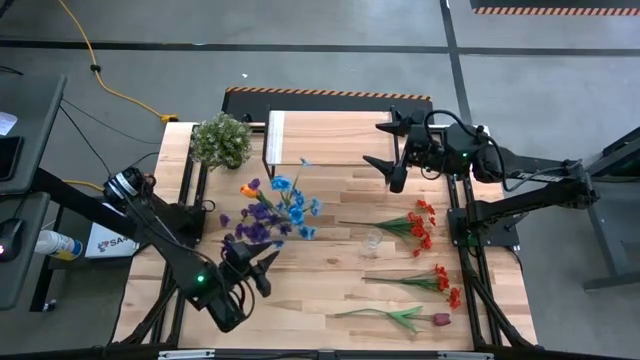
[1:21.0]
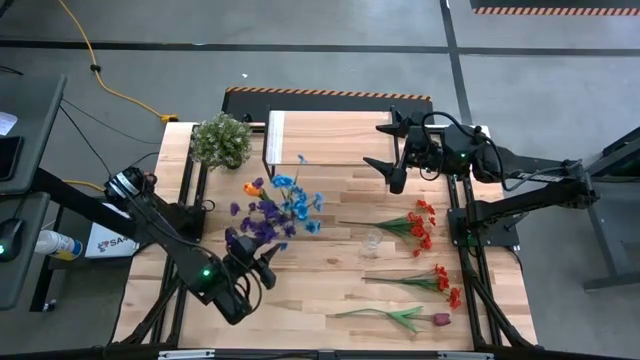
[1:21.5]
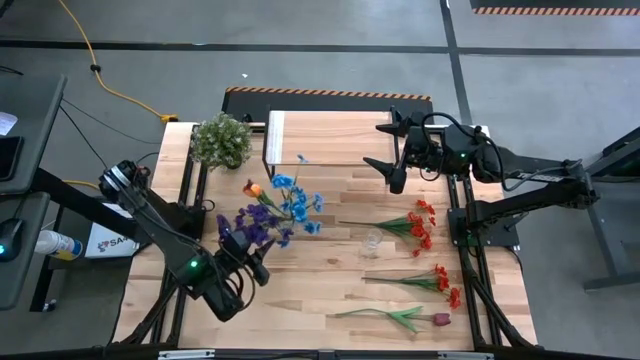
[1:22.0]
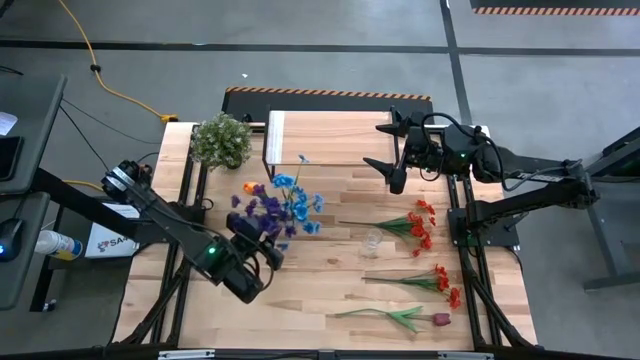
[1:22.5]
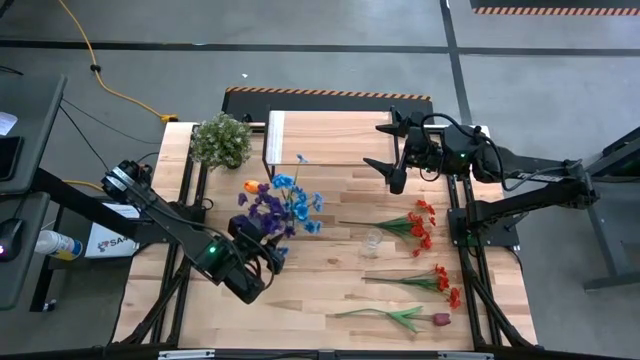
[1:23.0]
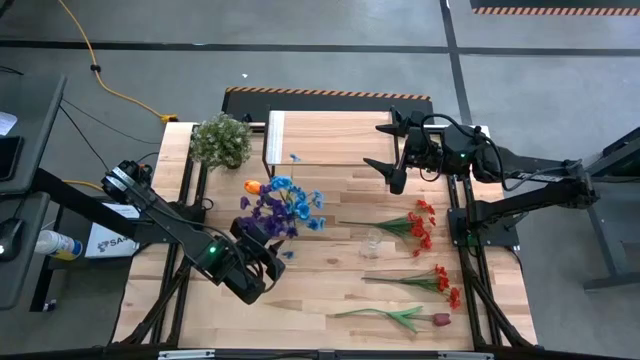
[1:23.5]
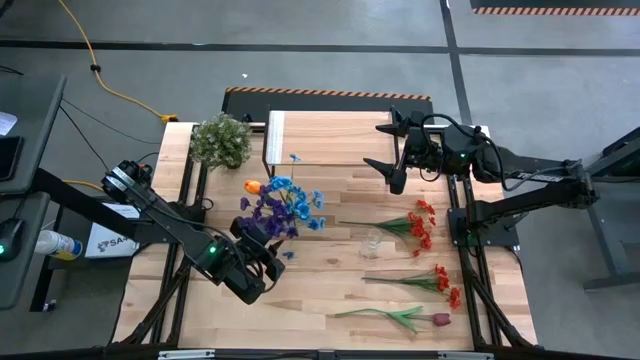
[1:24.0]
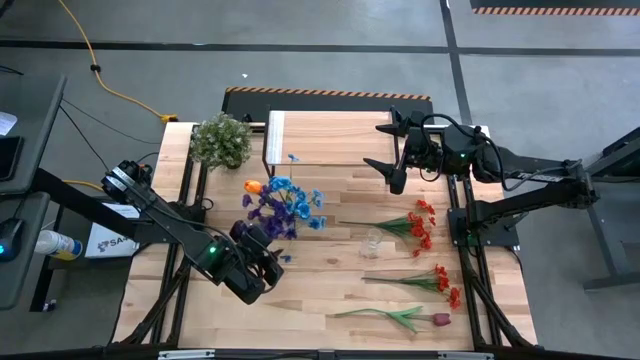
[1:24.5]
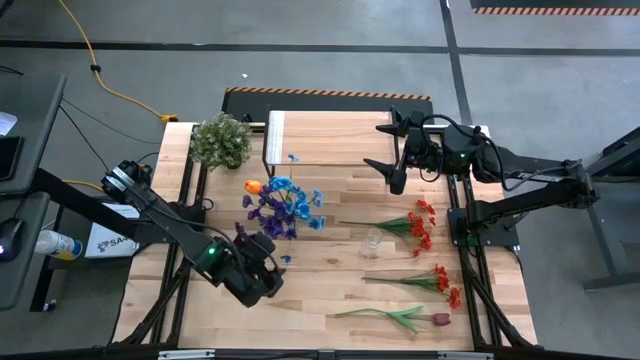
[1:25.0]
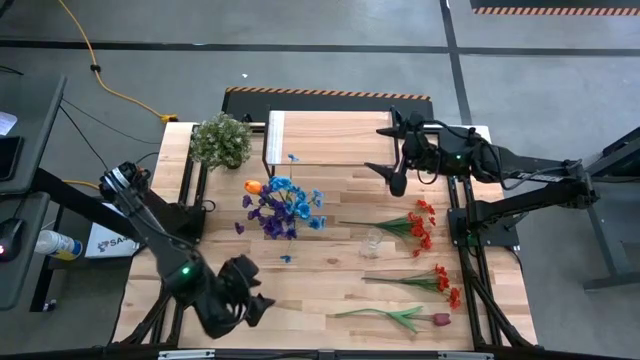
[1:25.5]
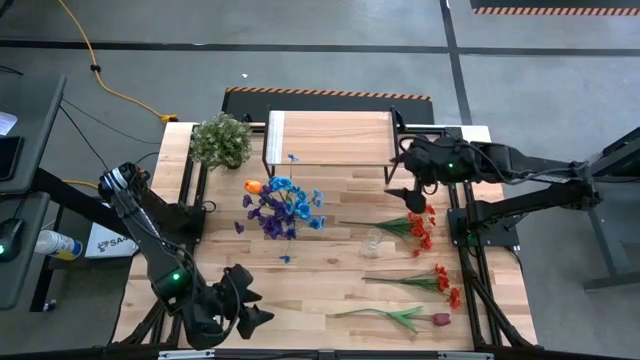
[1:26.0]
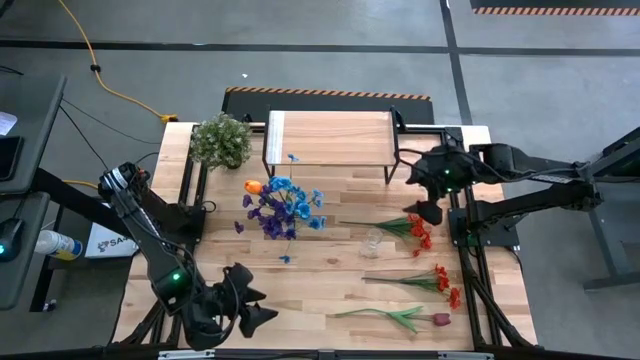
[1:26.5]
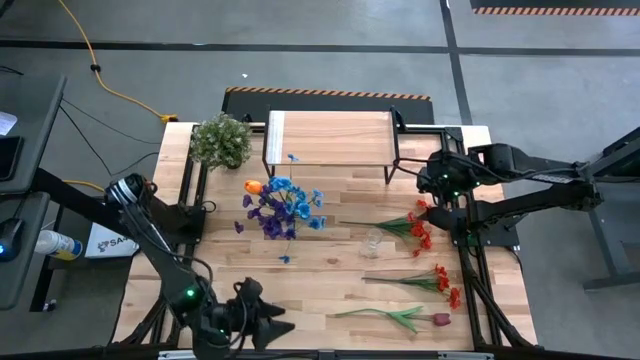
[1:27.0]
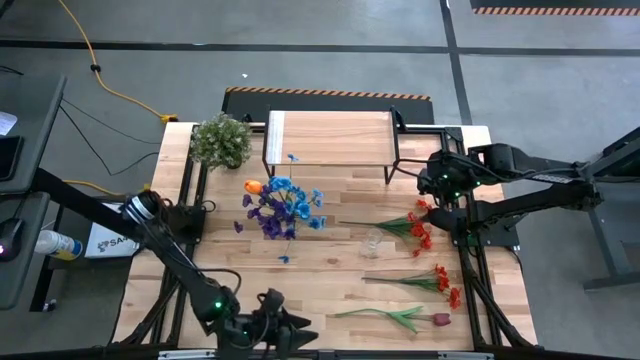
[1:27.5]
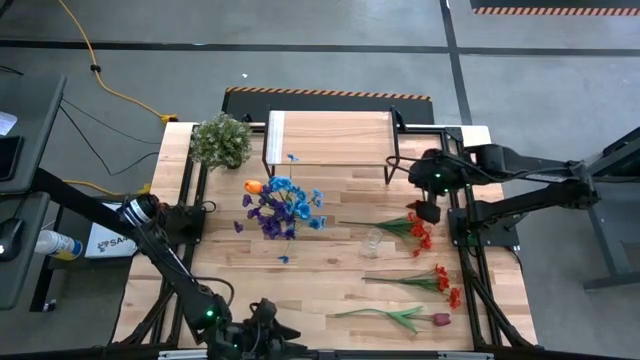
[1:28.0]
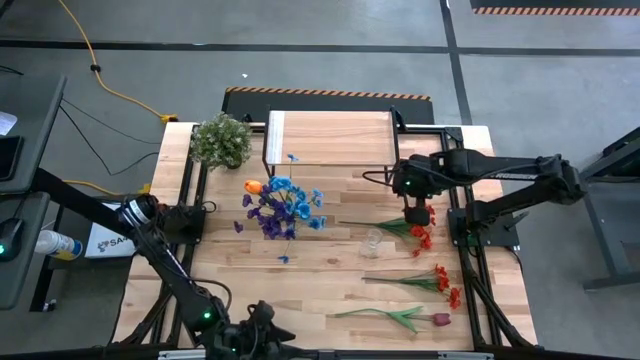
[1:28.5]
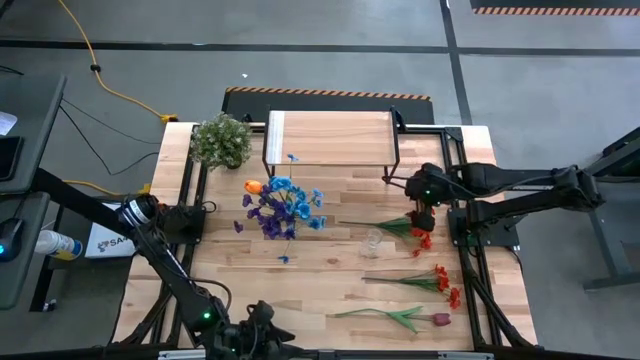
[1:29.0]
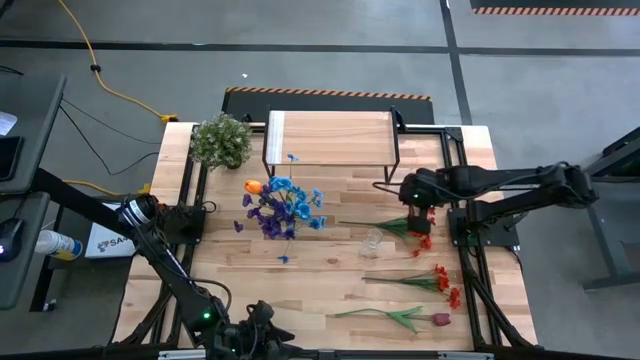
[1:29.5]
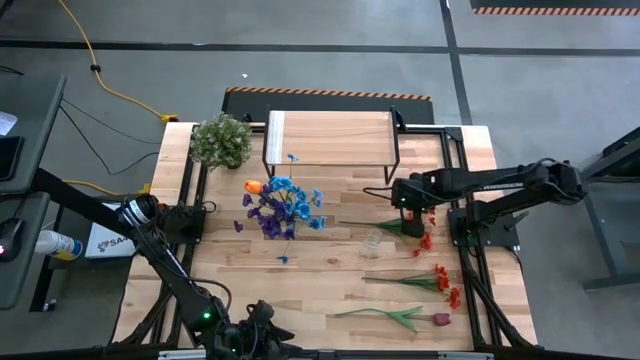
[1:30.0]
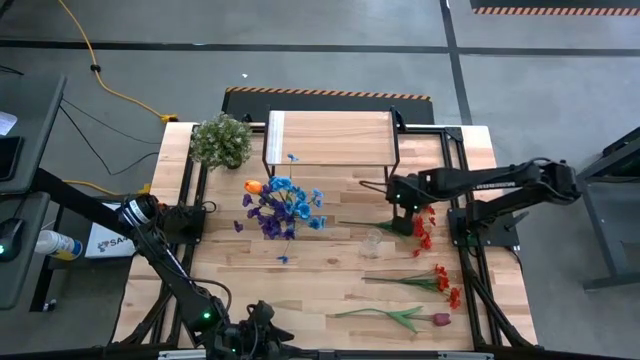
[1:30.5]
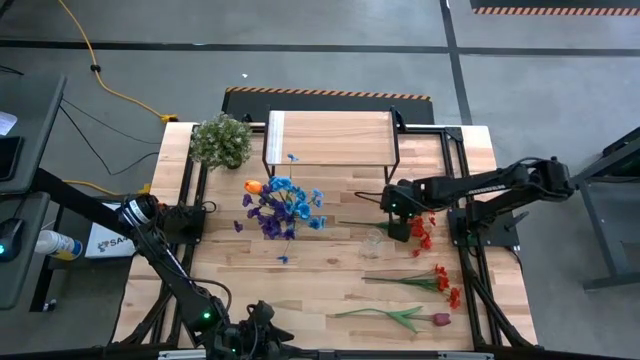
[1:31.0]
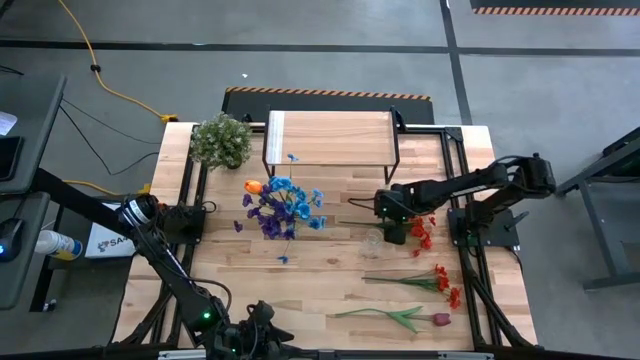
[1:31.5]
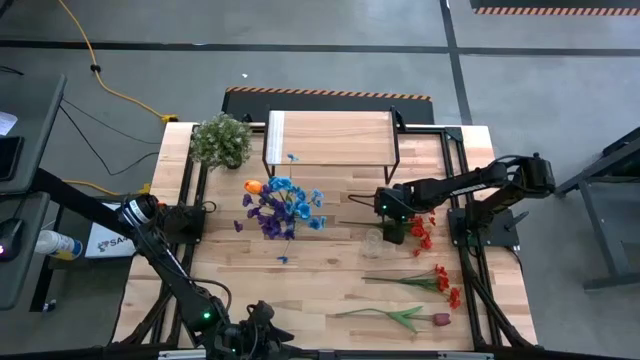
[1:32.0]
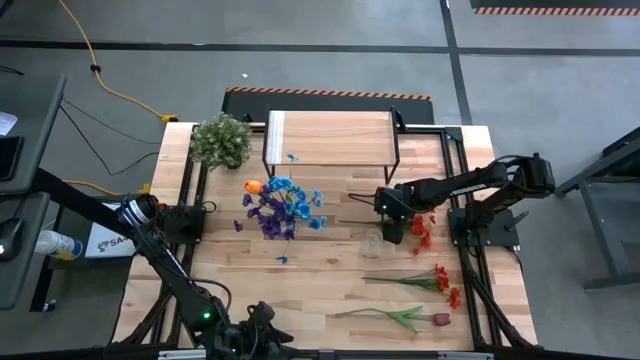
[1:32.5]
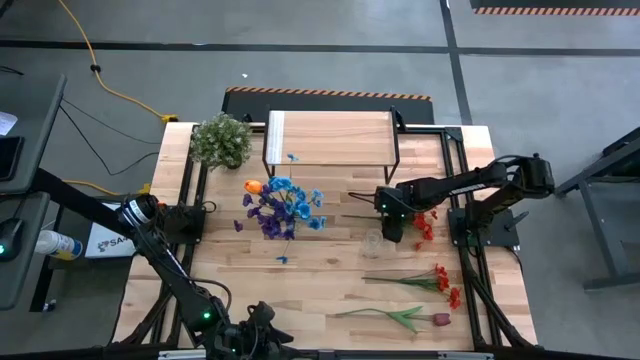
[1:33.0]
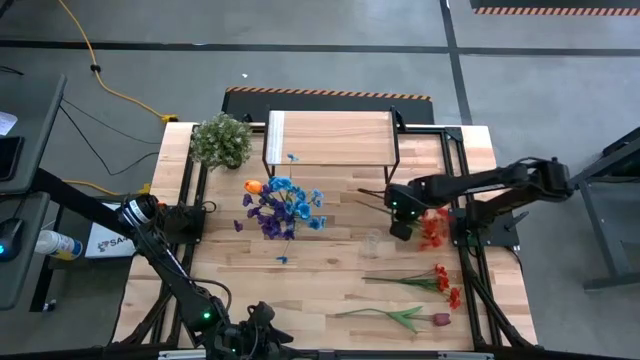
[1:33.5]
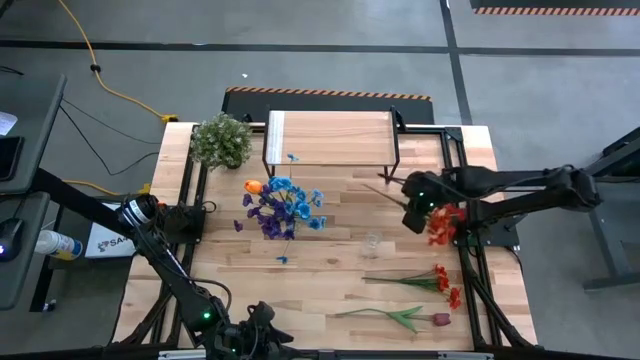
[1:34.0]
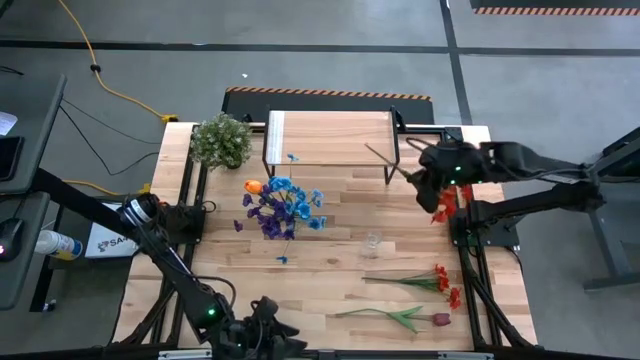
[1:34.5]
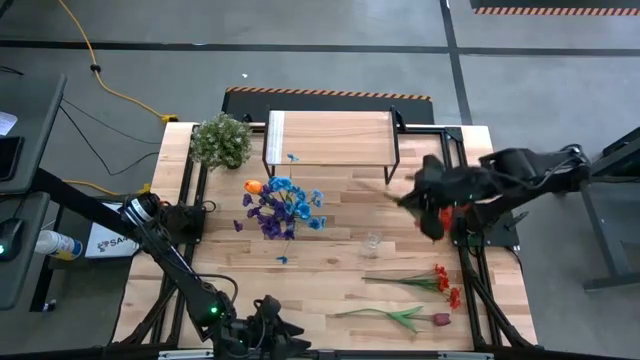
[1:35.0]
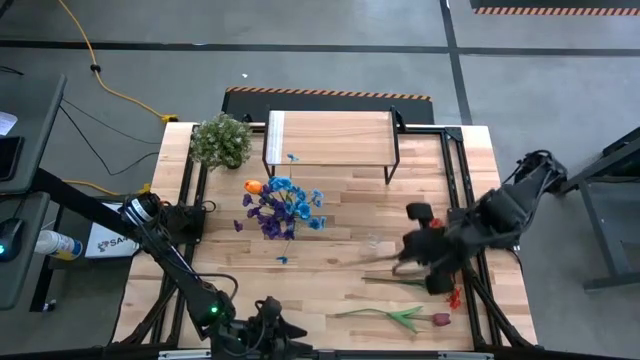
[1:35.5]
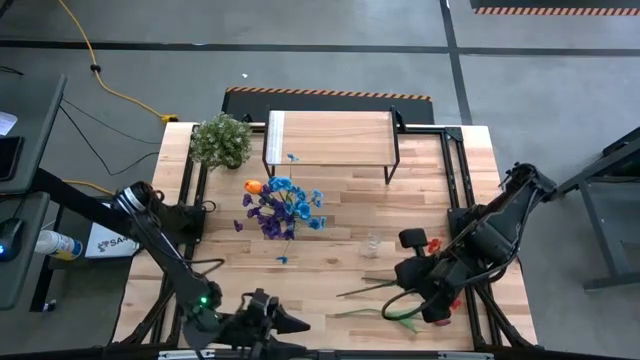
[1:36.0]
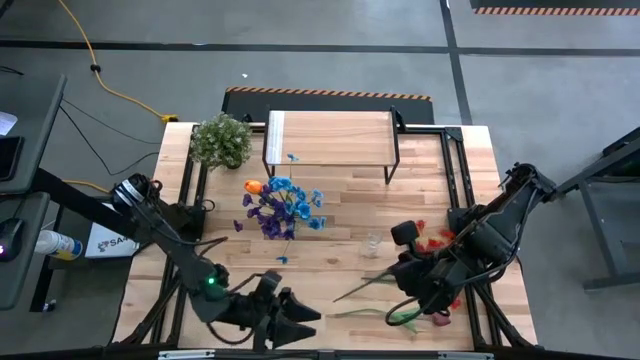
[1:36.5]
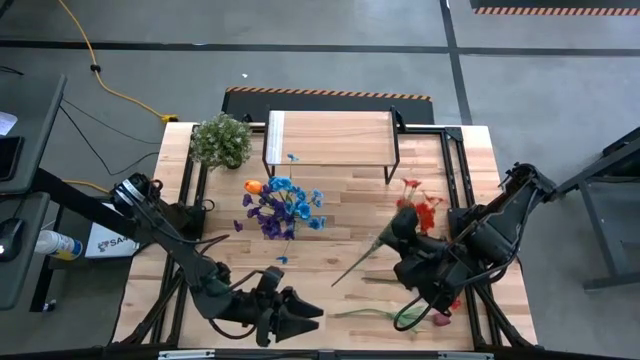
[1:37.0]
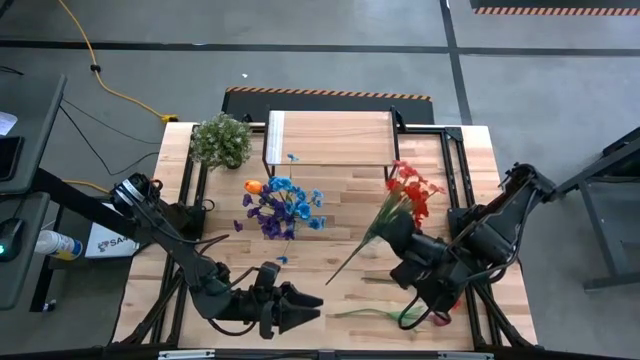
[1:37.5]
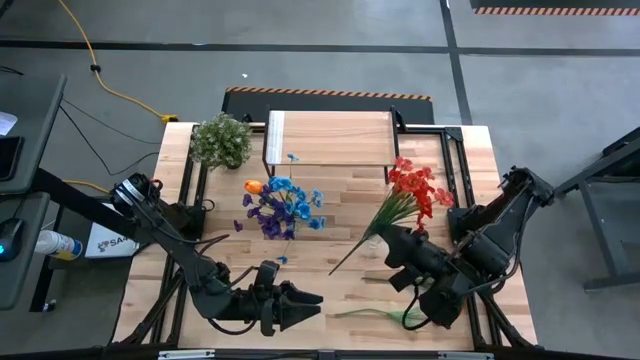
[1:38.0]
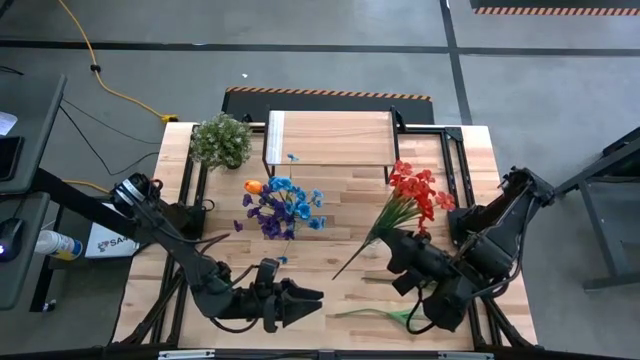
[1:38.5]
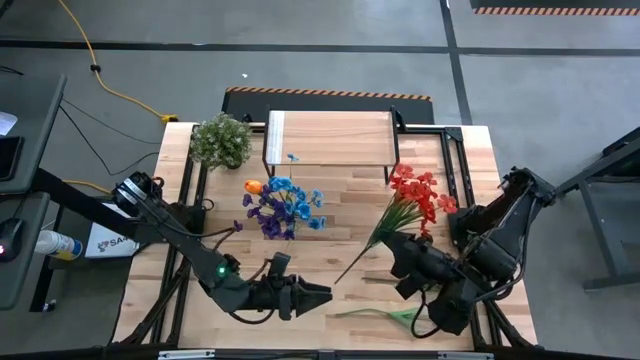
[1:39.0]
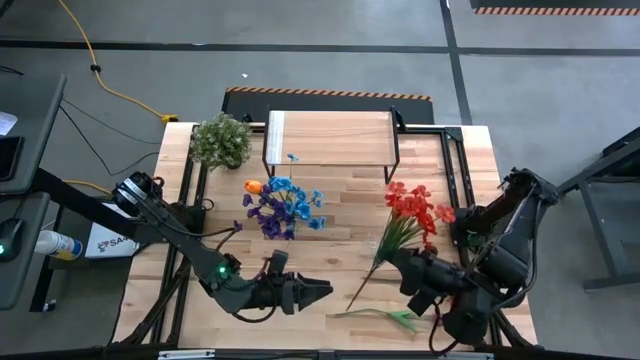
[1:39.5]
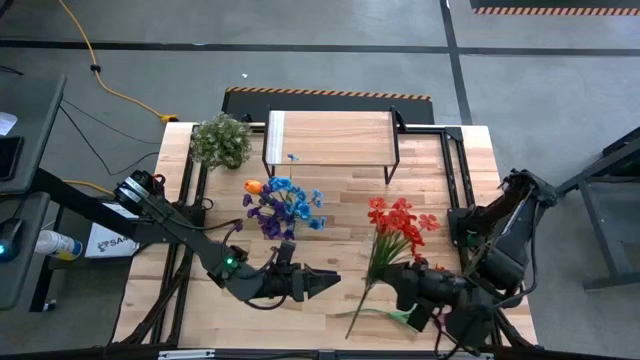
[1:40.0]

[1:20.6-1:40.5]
Task: Pick and place flowers into a vace then onto a shelf
Put the top red flowers into the right transparent vase

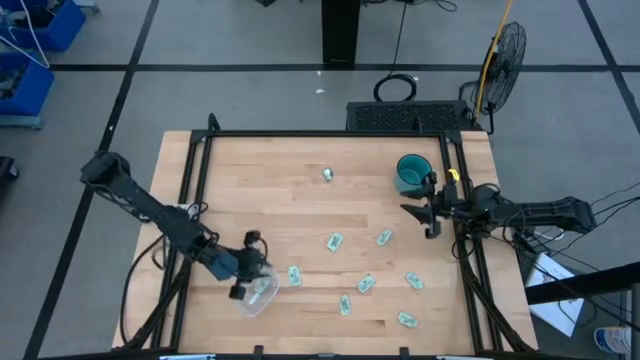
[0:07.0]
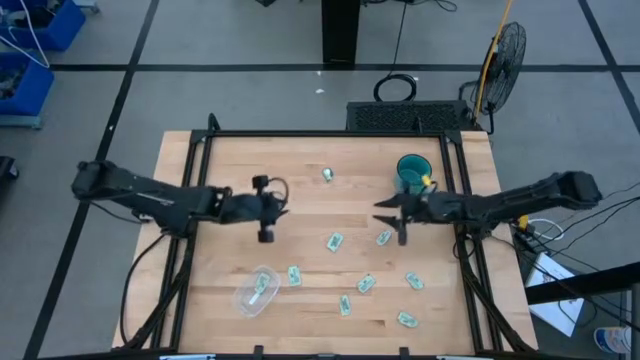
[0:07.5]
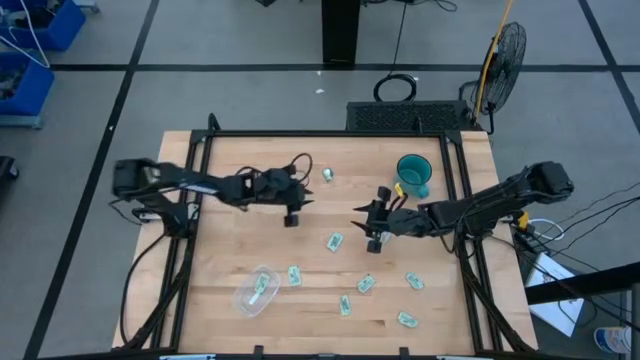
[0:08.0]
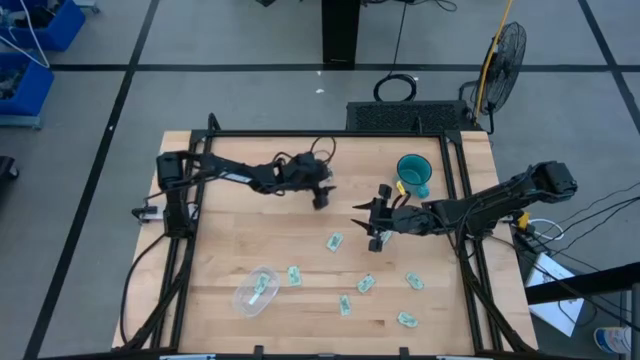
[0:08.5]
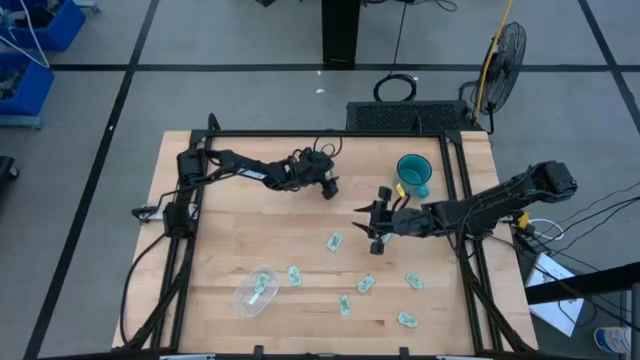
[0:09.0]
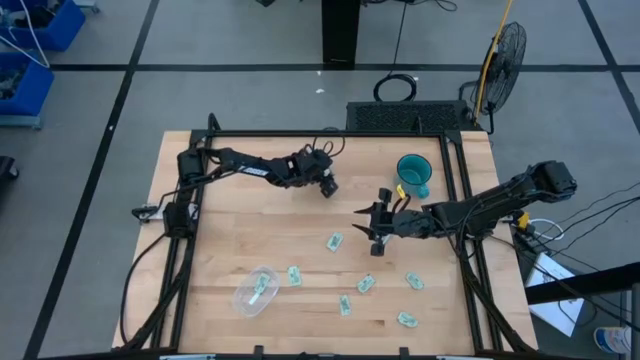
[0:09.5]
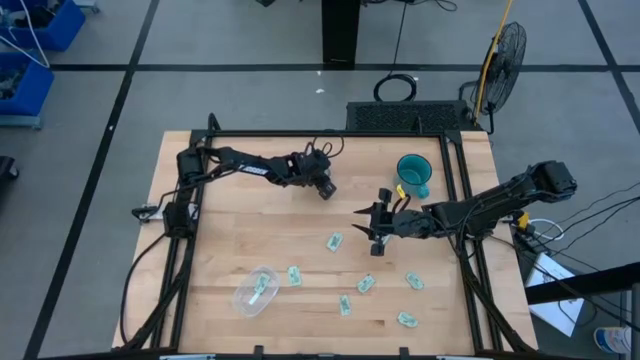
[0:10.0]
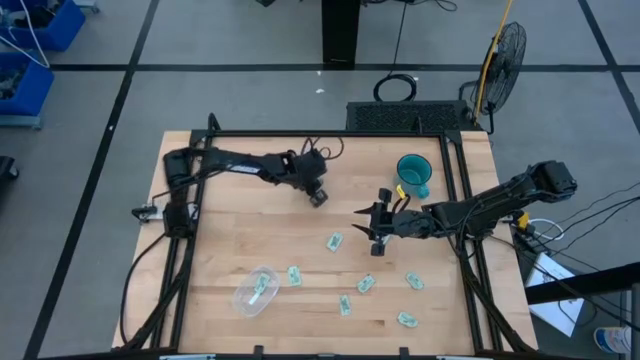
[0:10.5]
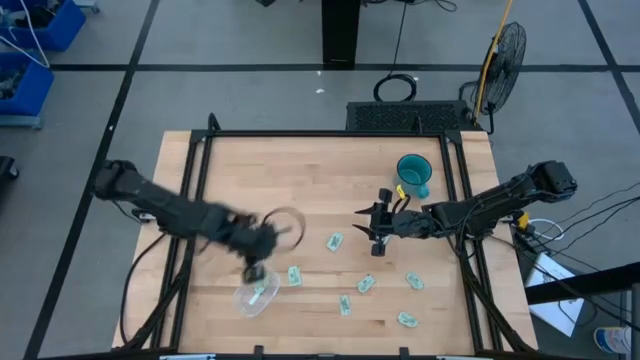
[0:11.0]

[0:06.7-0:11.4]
Task: Pick and place Stevia / Truvia into bins
Put the green stevia packet into the transparent bin
